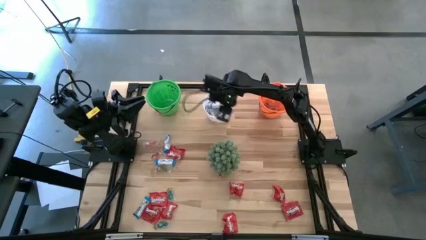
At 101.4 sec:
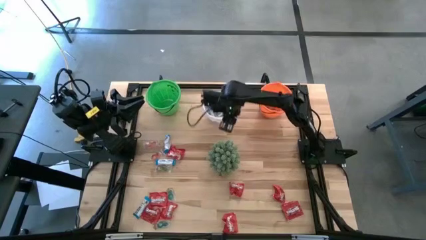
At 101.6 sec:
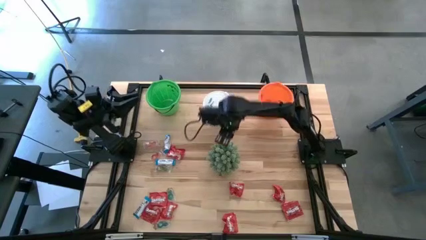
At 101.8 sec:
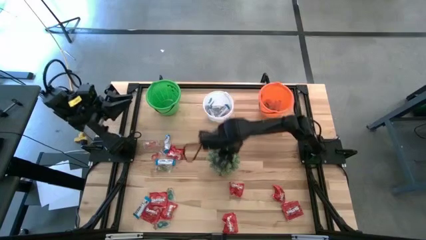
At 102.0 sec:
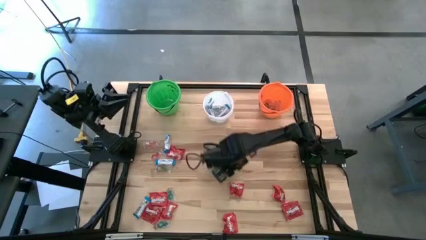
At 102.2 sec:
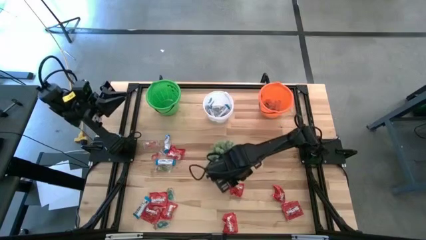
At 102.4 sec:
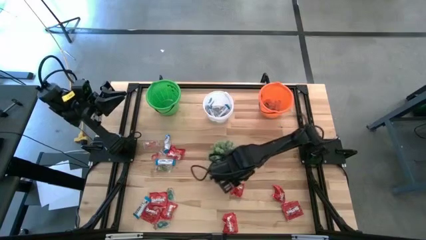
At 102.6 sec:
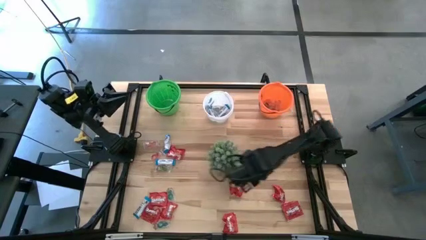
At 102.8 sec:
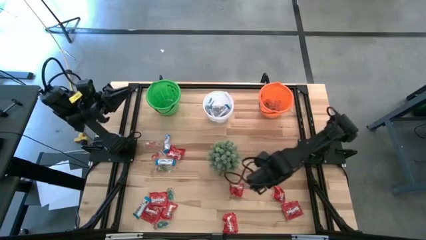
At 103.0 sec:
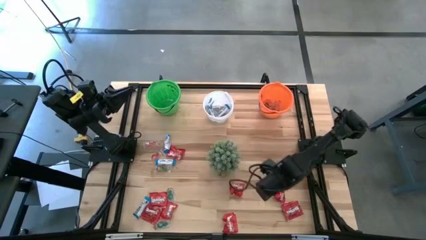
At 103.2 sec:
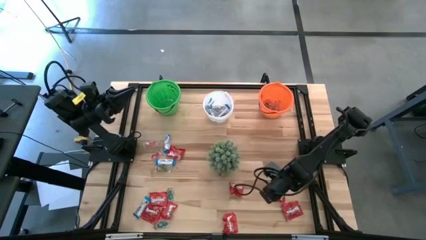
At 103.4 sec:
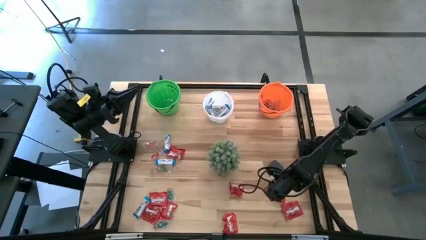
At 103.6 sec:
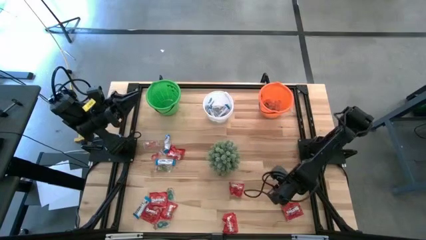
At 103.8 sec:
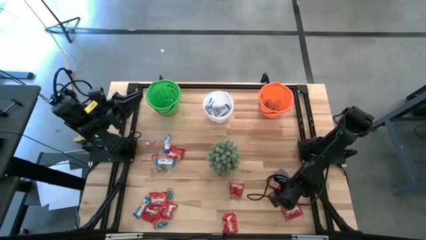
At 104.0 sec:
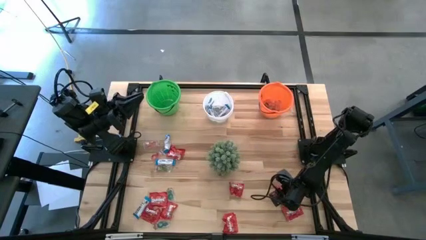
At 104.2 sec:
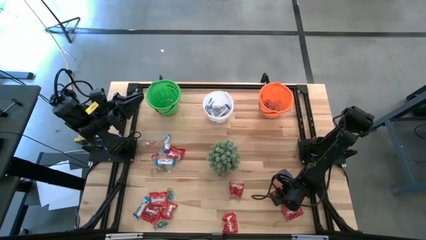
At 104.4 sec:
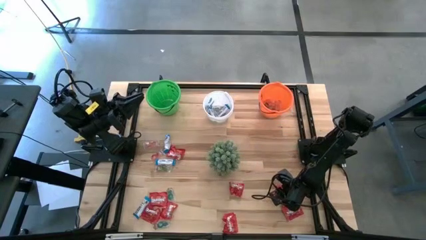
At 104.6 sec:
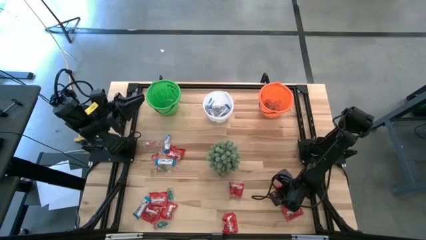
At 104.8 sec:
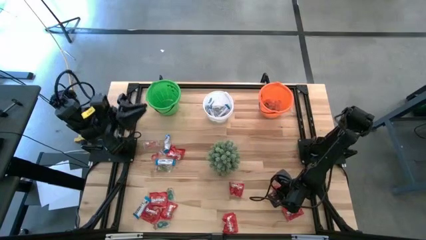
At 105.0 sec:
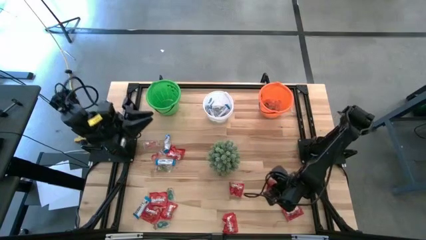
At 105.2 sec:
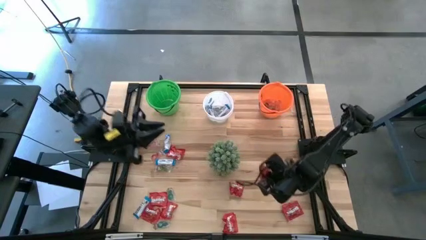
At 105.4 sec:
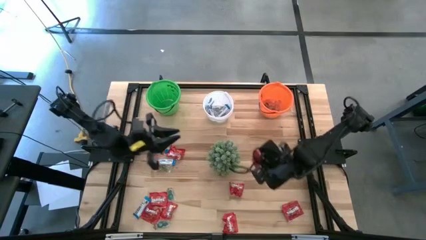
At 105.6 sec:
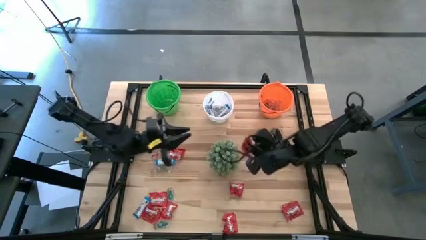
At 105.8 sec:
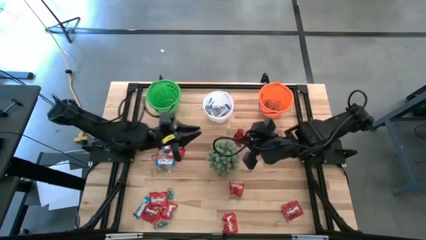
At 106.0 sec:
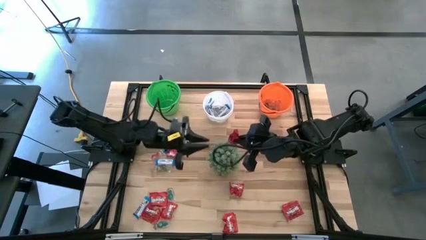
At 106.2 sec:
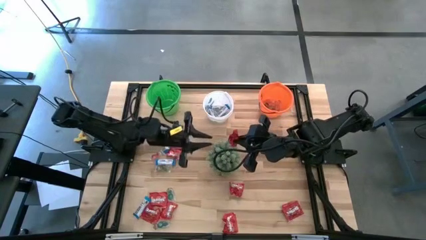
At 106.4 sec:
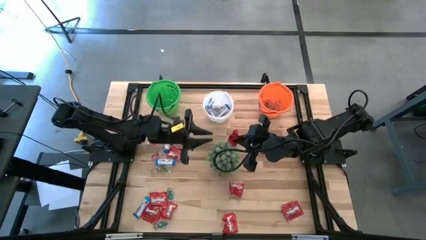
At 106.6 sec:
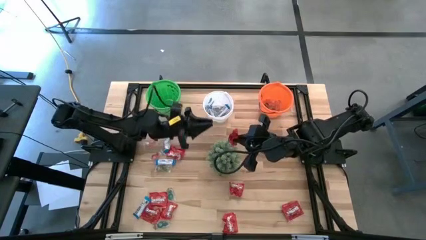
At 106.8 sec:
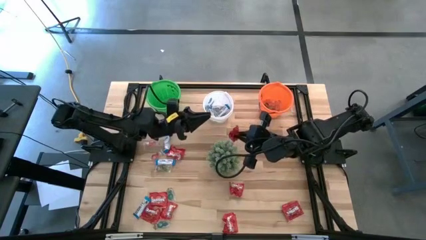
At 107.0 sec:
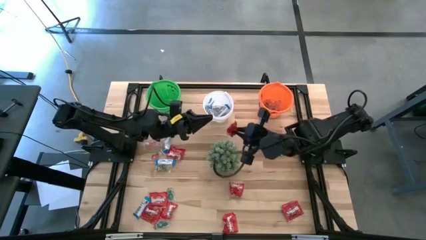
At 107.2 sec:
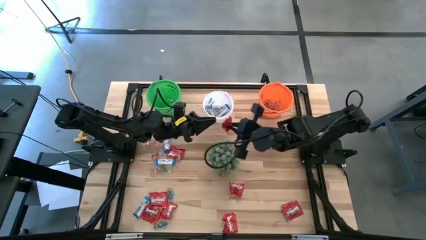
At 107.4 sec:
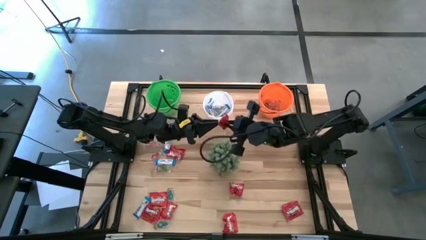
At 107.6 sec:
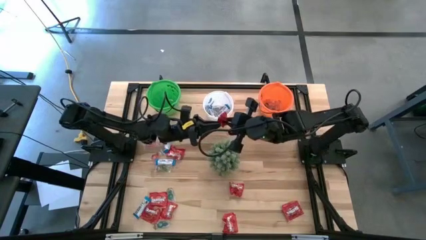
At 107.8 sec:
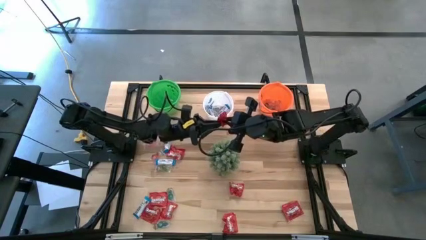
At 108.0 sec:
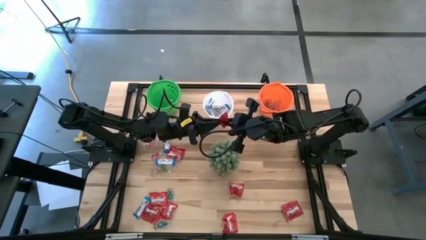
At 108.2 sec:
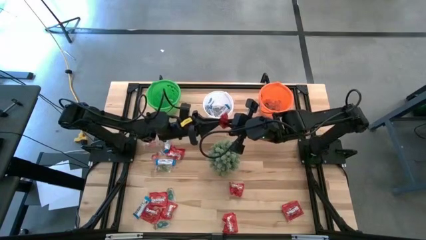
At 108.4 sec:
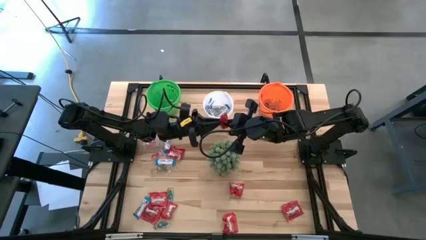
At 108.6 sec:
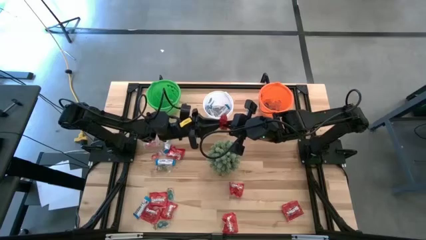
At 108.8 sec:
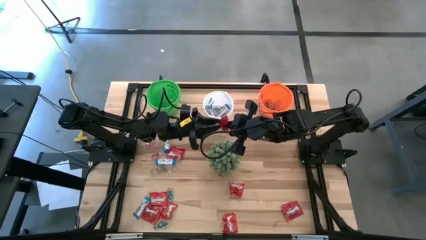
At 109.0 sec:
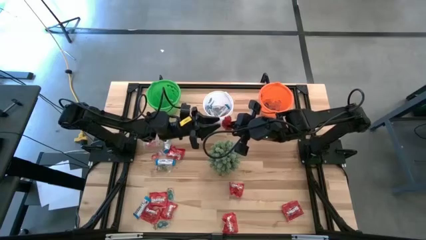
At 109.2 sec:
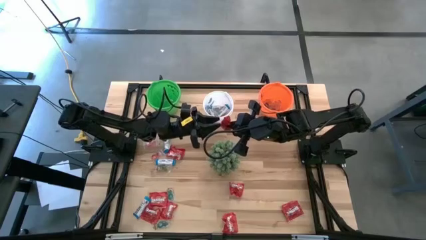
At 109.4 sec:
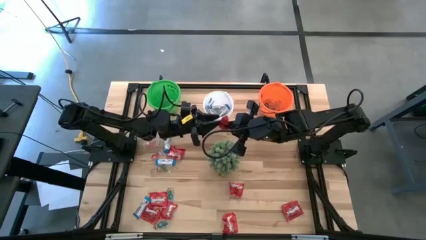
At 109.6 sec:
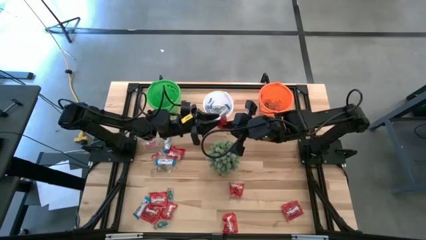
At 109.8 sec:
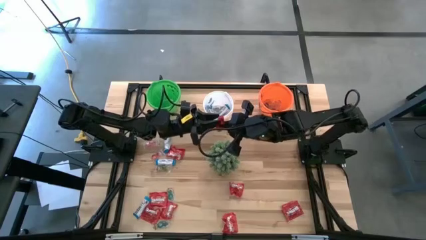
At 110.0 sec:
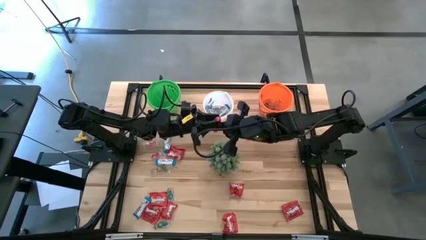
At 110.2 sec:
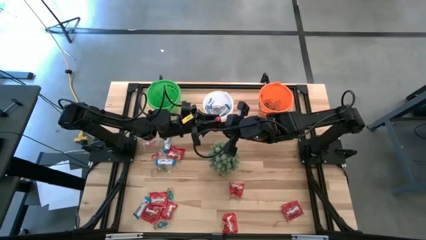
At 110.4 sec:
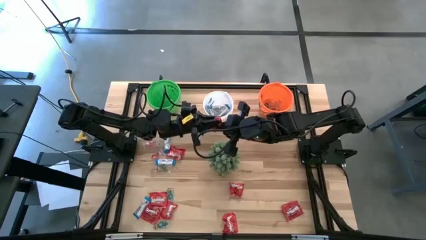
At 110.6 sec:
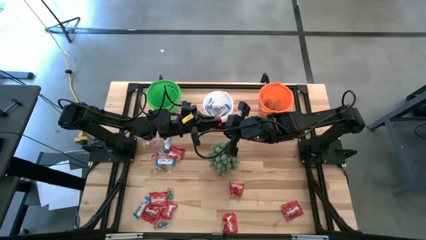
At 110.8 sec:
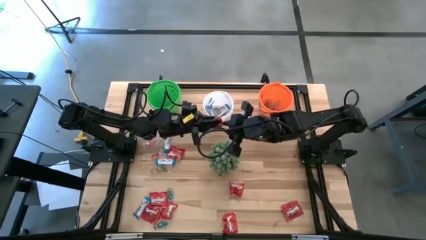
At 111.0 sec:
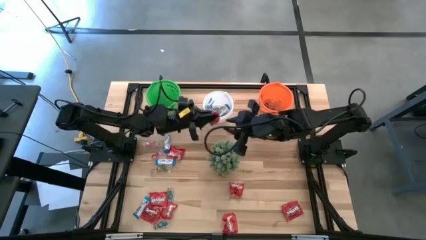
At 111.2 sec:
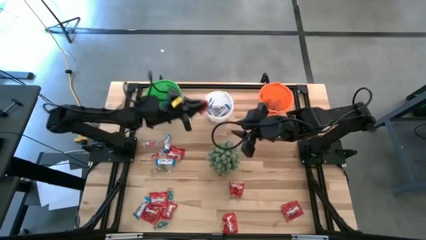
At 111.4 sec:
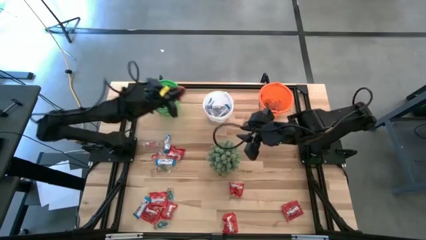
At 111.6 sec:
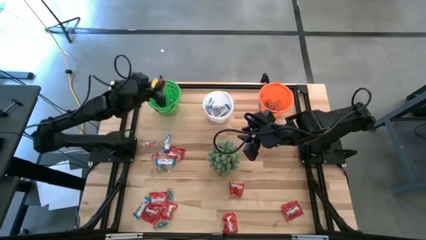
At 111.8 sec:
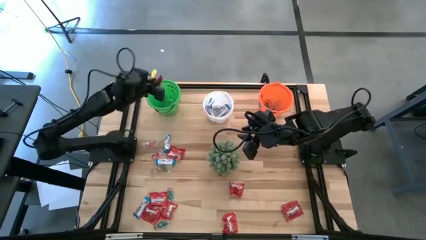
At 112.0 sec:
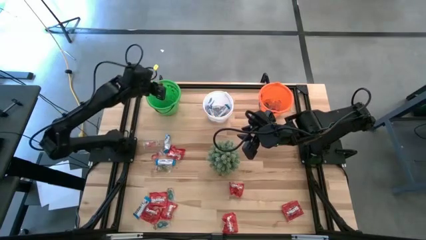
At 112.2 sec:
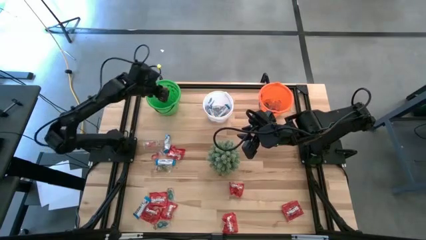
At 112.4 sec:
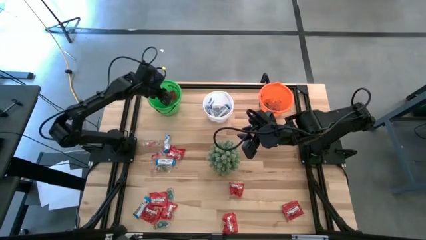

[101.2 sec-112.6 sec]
Task: Sort candy
Put the red candy into the green bucket
